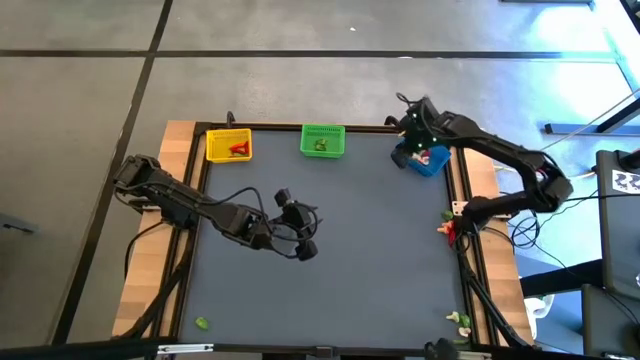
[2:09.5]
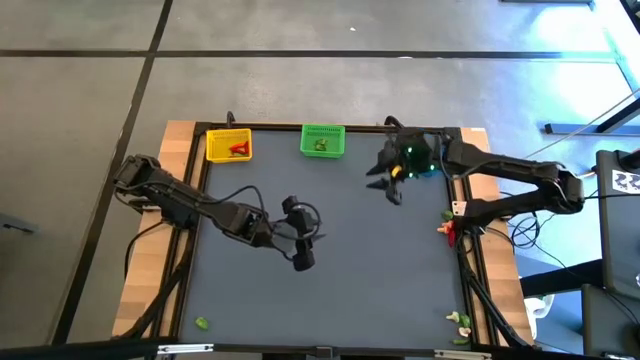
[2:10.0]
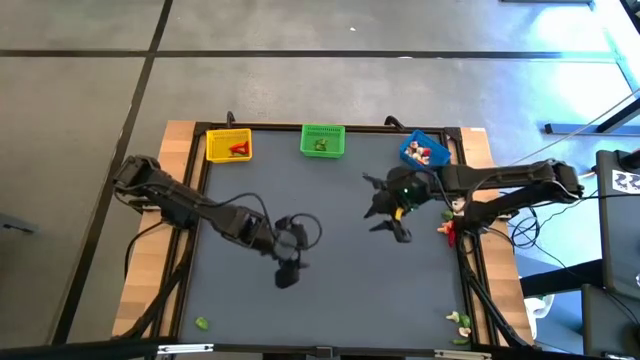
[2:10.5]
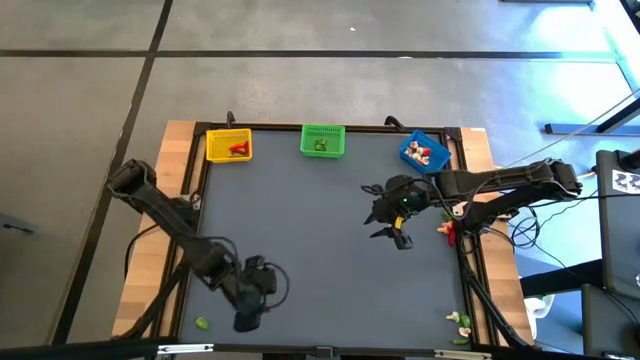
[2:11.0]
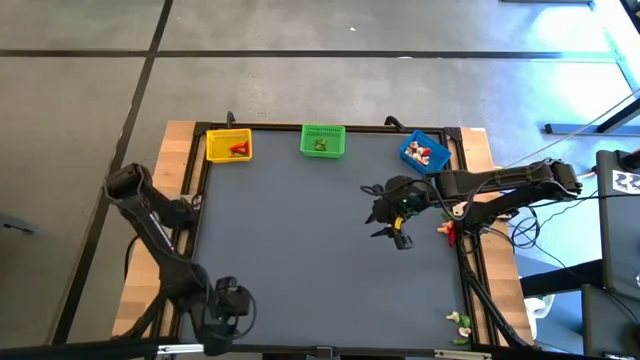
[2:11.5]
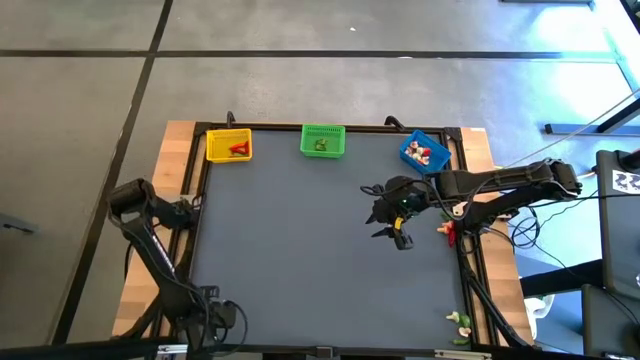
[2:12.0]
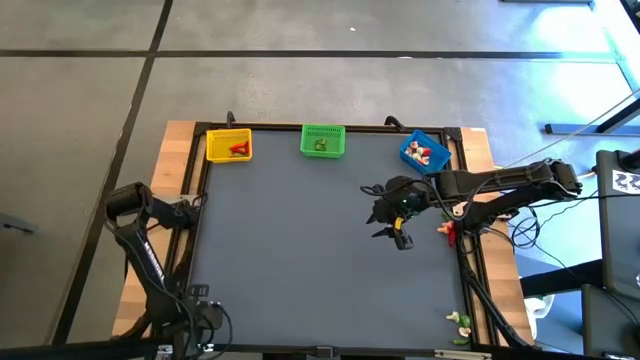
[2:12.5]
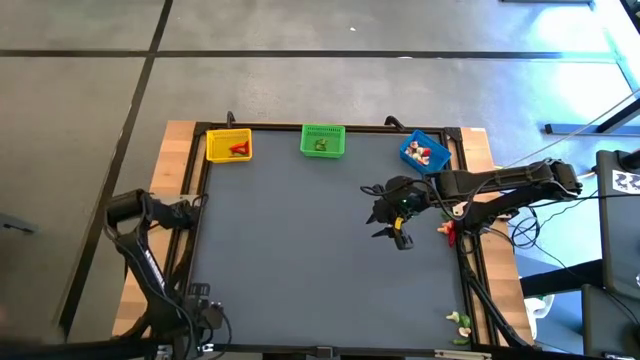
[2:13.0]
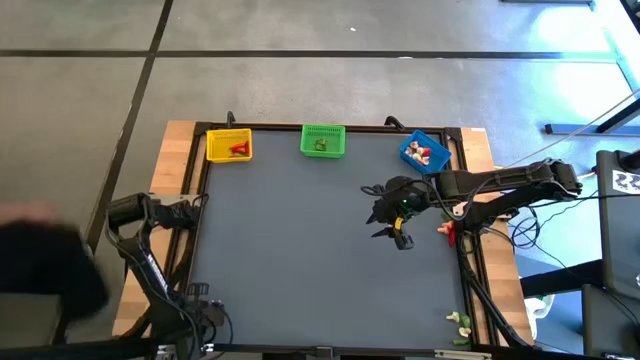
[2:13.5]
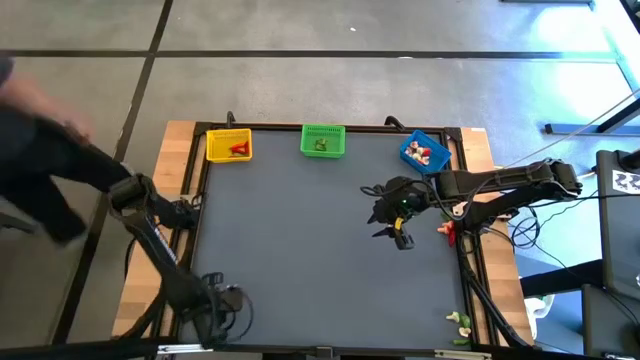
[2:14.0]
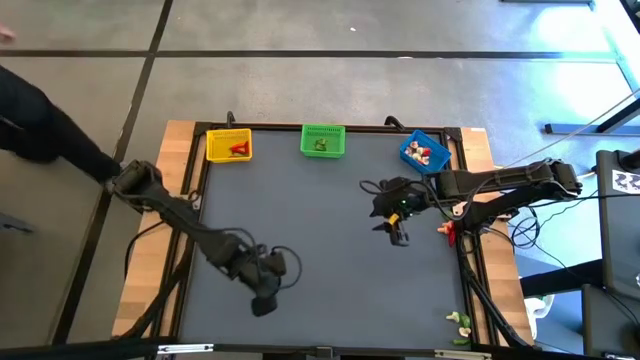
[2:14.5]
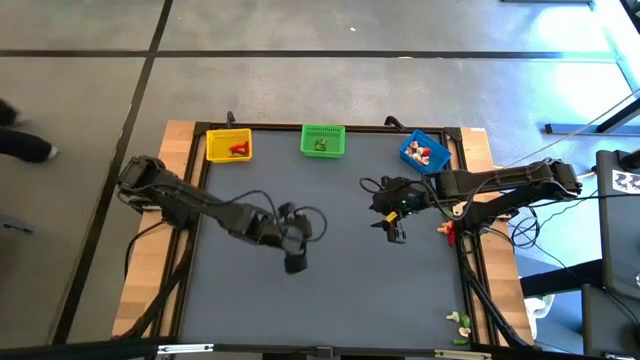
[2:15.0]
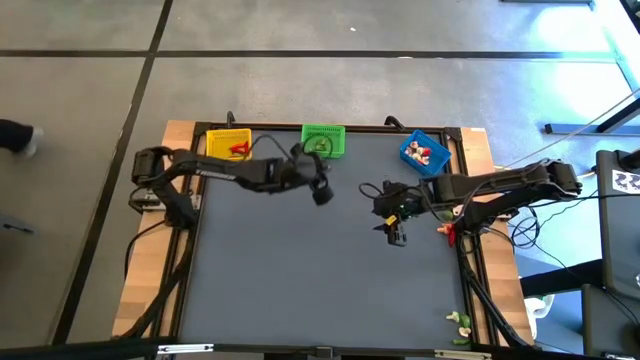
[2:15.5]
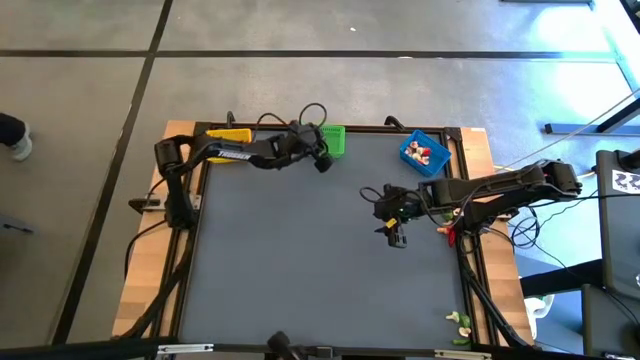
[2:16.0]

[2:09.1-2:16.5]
Task: Sort produce into baskets
Put the small green chili pepper into the green basket

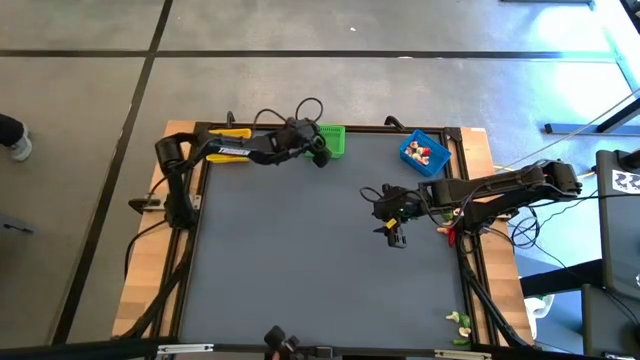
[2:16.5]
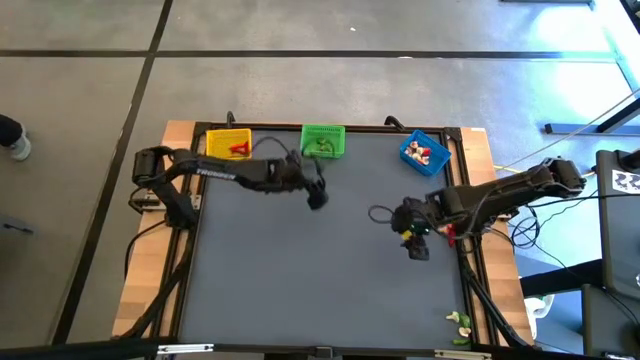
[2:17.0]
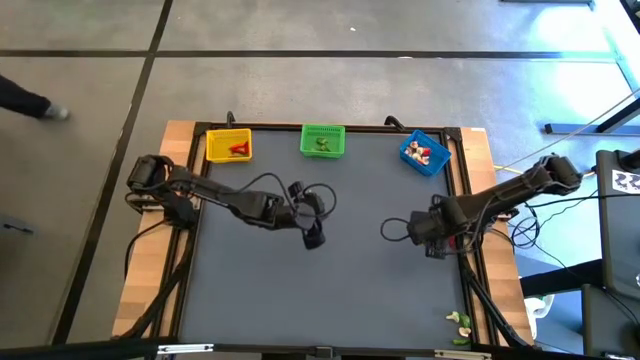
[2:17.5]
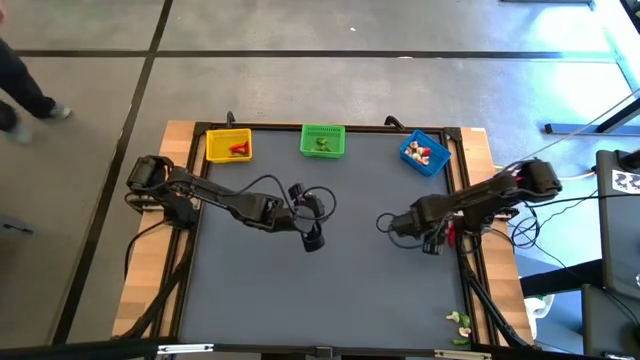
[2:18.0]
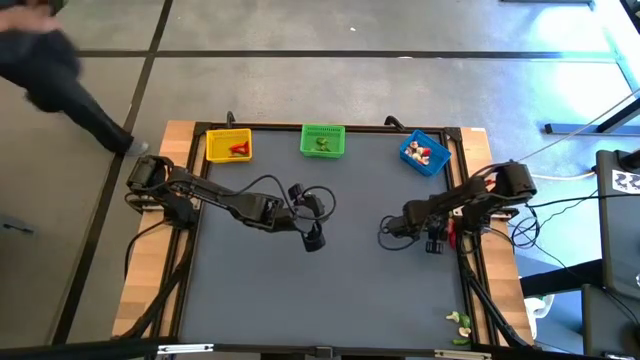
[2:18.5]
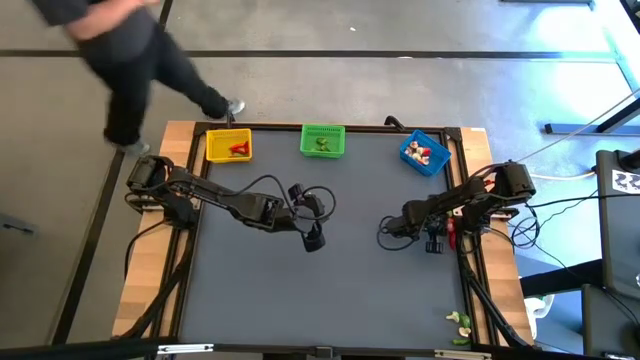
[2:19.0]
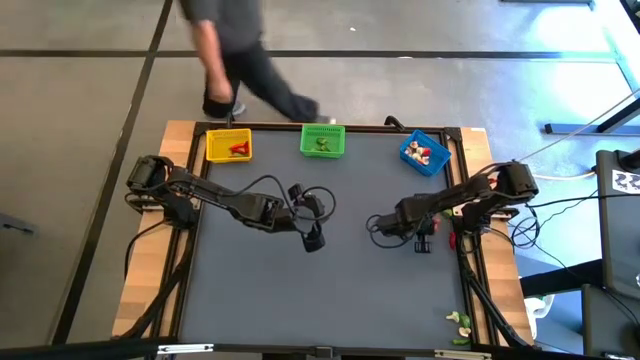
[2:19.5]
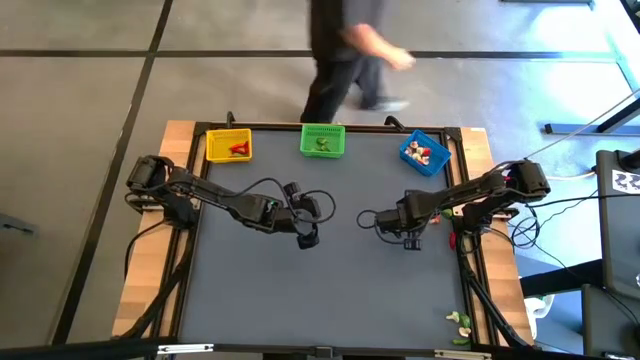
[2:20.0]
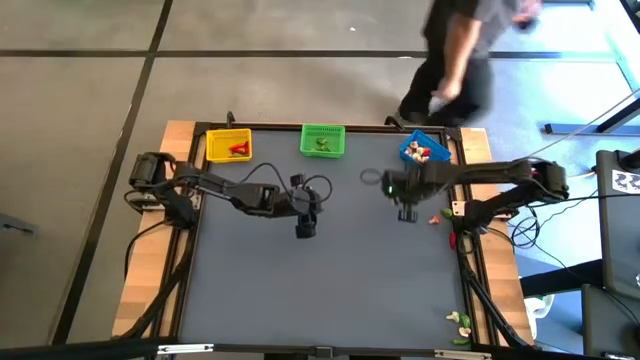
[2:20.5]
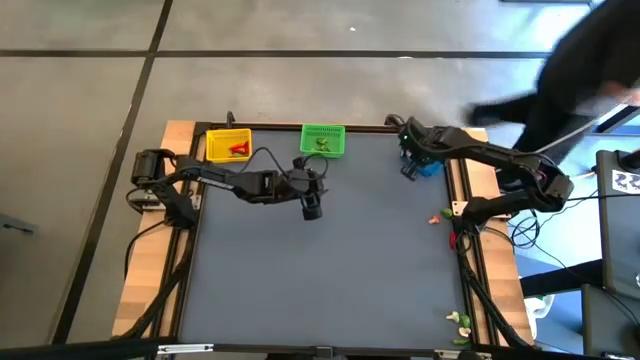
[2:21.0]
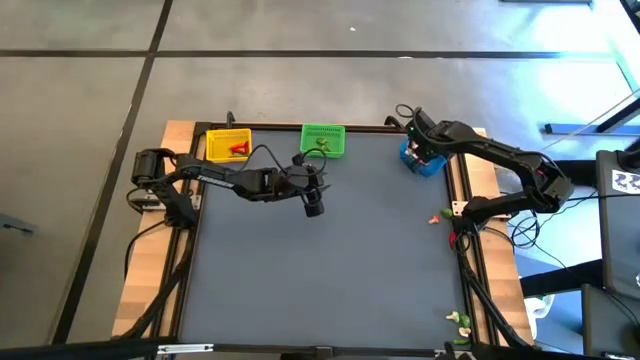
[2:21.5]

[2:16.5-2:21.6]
Put the red mushroom into the blue basket

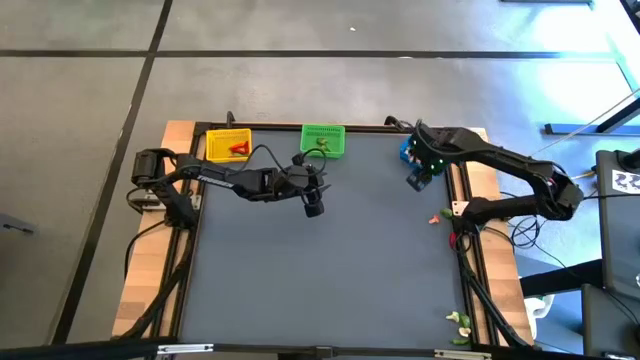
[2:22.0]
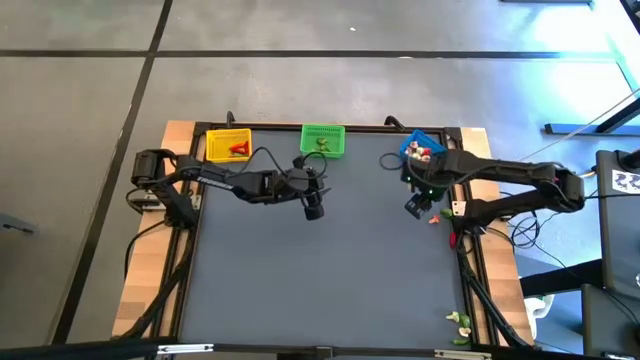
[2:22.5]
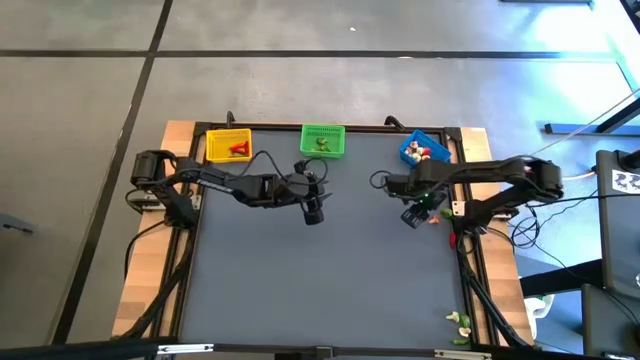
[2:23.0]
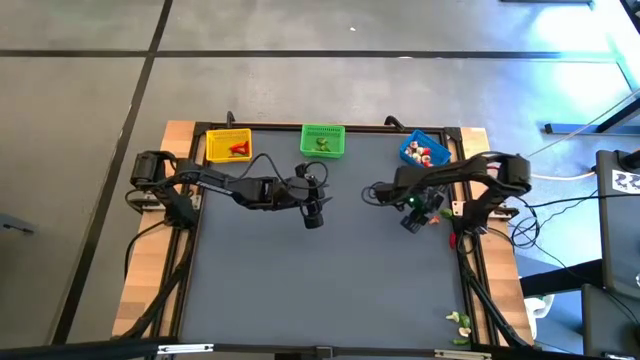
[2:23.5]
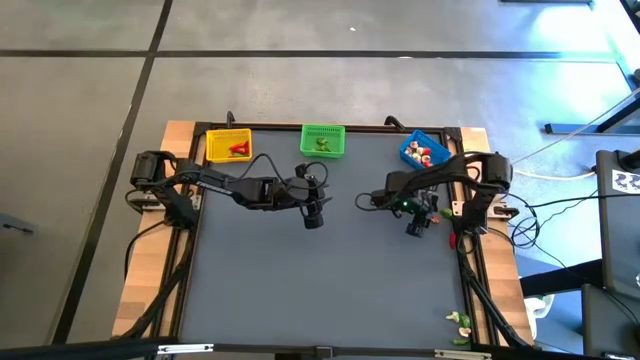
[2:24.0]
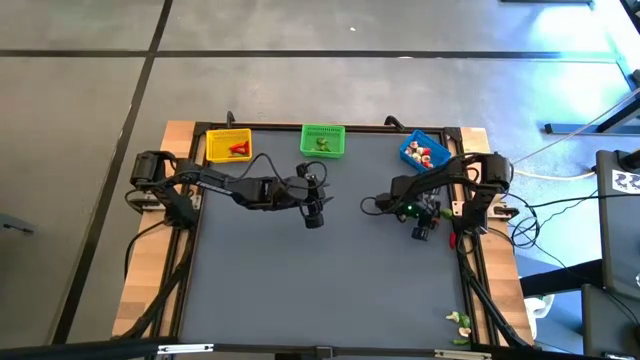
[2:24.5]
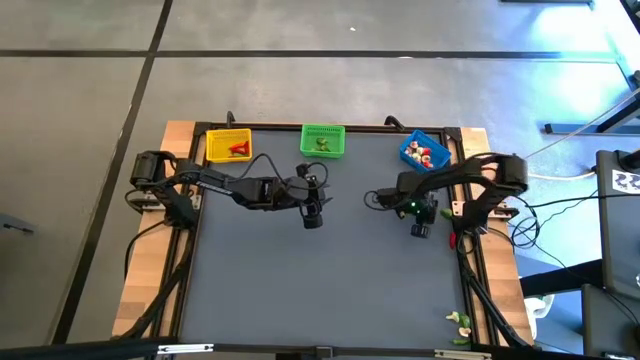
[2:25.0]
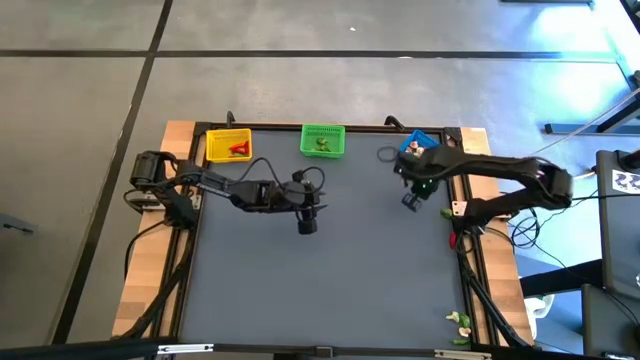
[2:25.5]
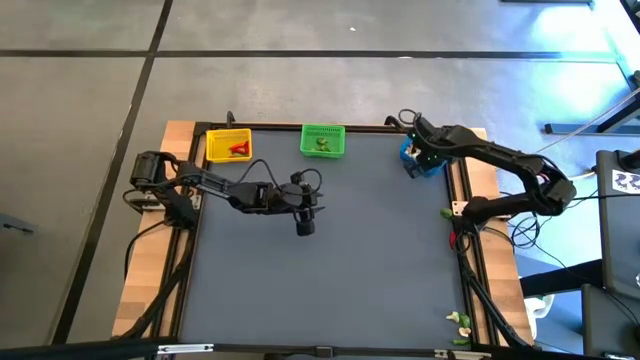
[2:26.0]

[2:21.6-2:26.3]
Put the red mushroom into the blue basket

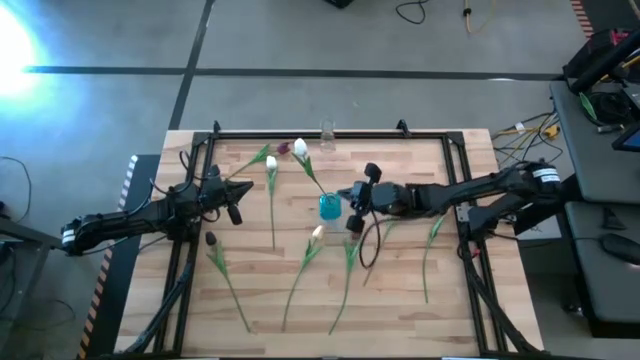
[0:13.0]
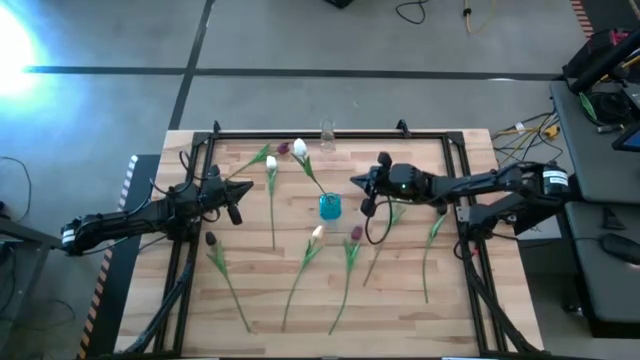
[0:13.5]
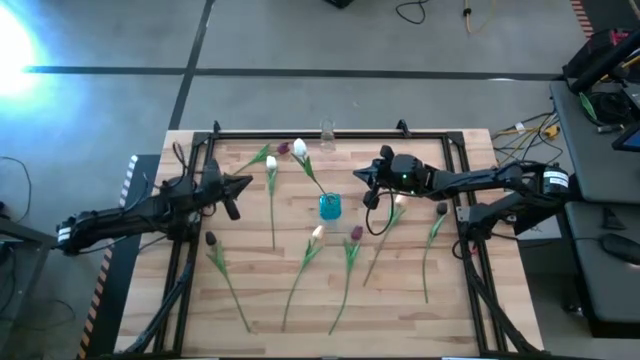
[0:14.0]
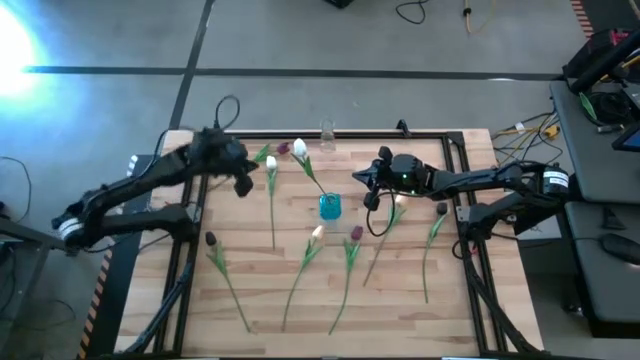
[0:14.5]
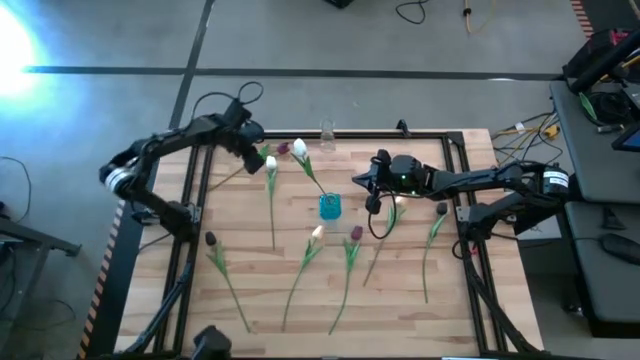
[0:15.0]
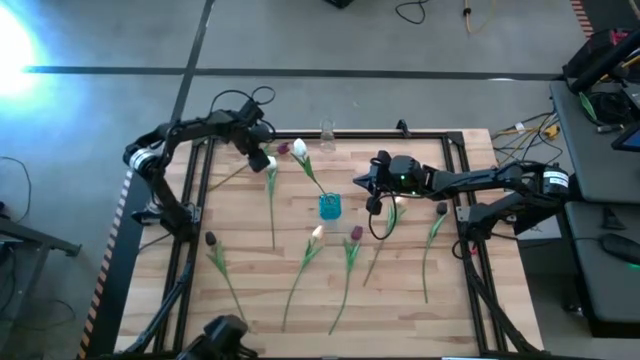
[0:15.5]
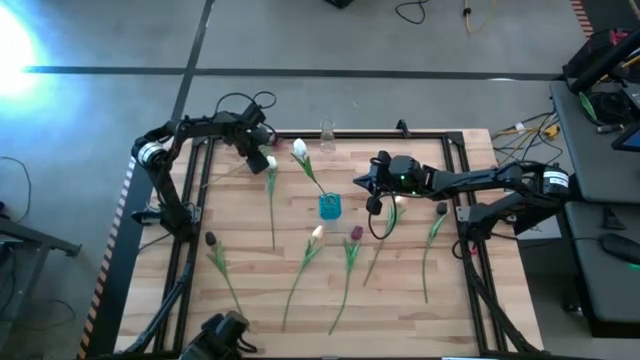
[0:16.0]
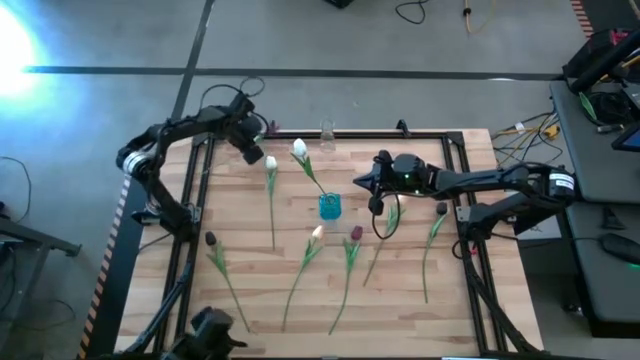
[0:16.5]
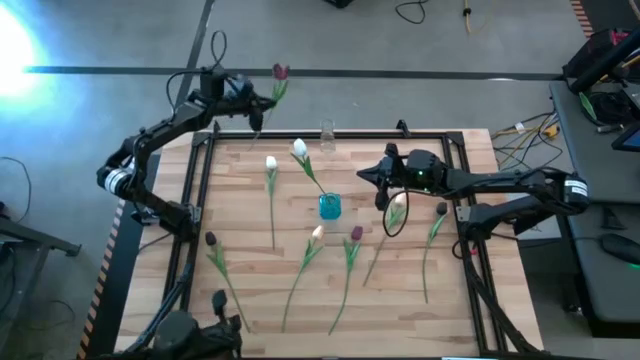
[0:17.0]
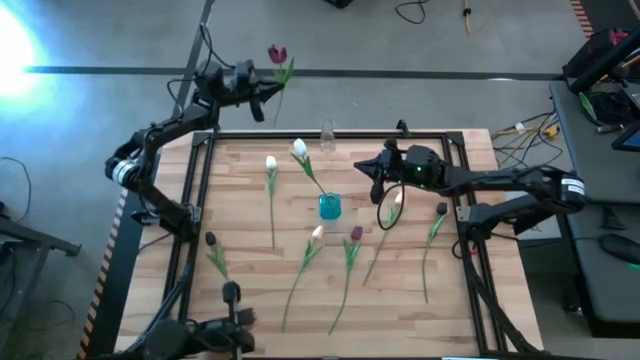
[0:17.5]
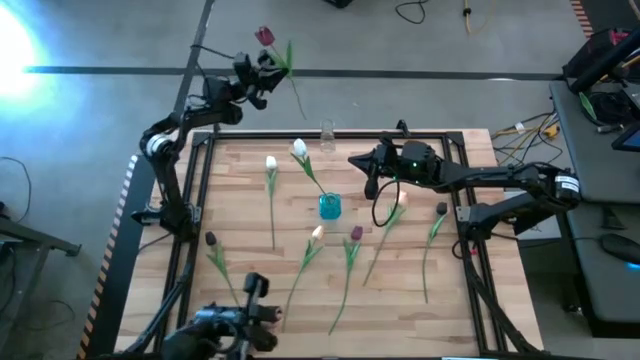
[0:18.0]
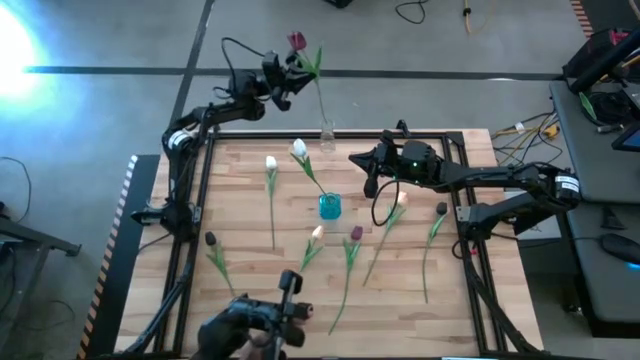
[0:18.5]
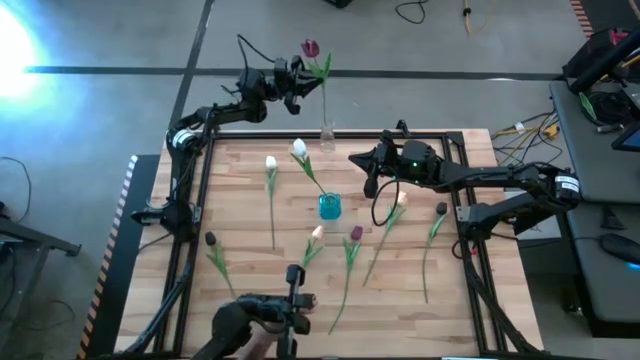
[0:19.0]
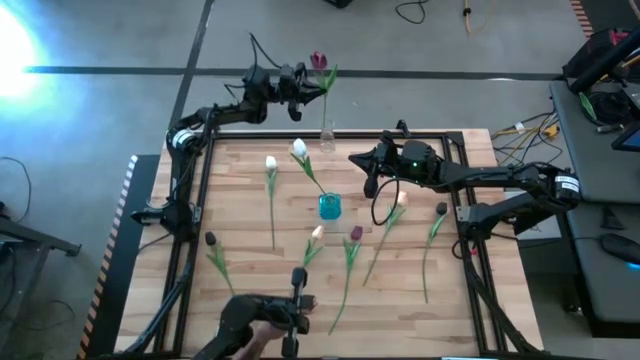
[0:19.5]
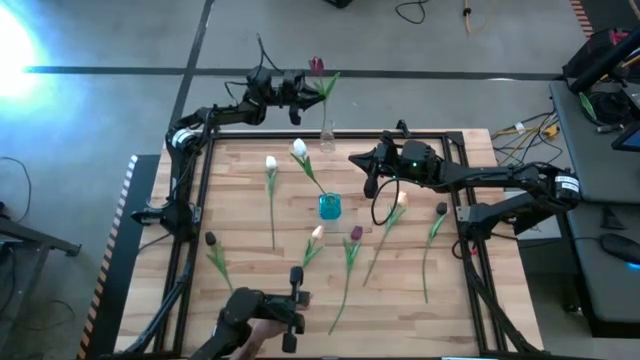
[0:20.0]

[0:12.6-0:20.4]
Task: Sort flowers into vase by color
Put the top red tulip into the transparent vase
